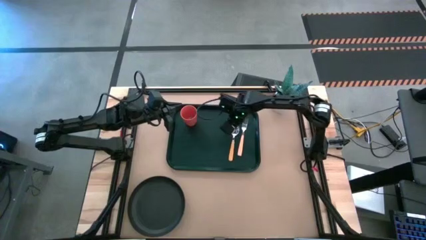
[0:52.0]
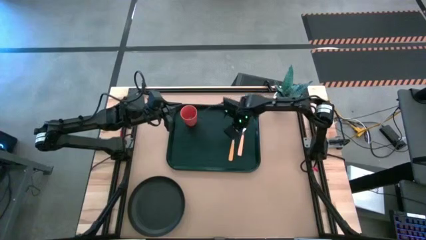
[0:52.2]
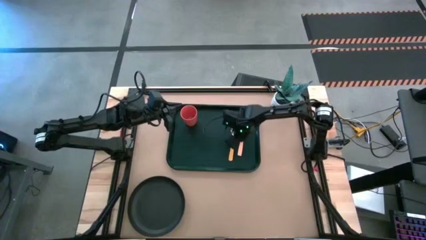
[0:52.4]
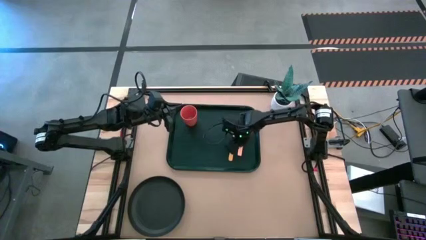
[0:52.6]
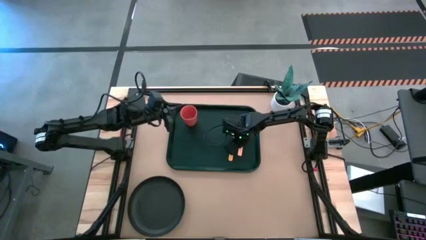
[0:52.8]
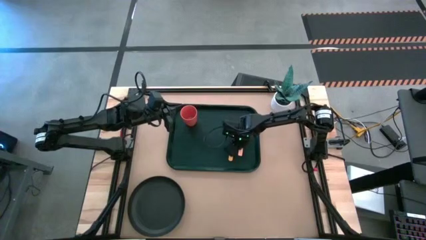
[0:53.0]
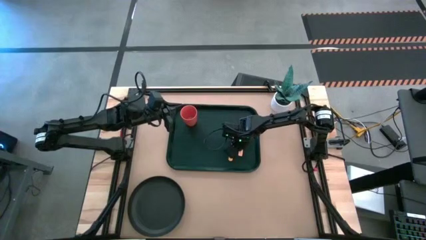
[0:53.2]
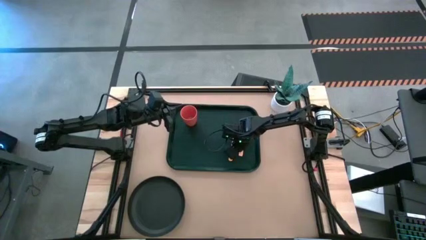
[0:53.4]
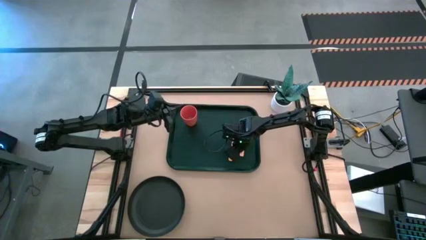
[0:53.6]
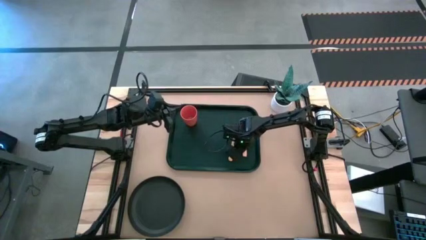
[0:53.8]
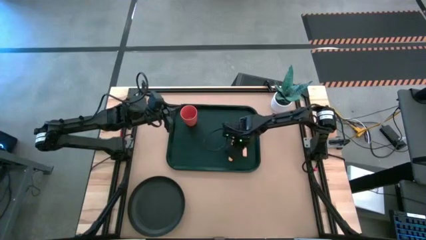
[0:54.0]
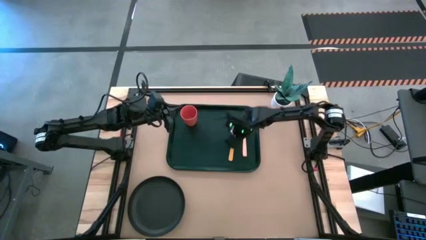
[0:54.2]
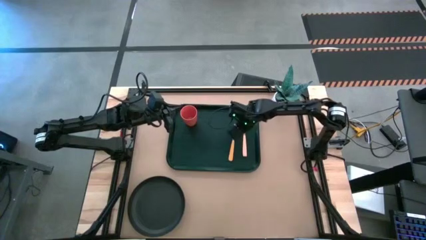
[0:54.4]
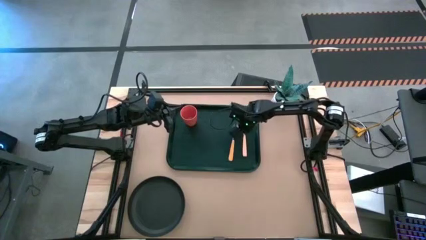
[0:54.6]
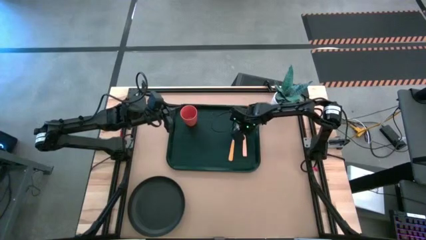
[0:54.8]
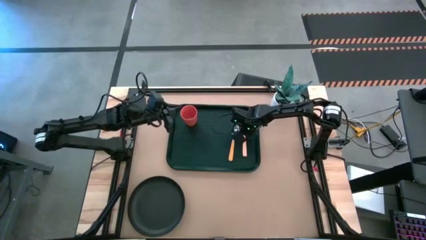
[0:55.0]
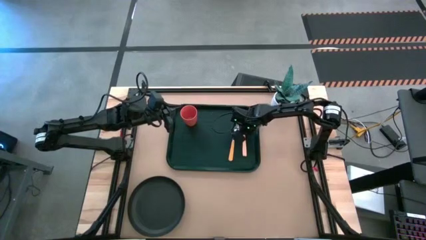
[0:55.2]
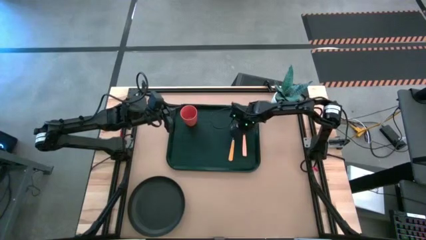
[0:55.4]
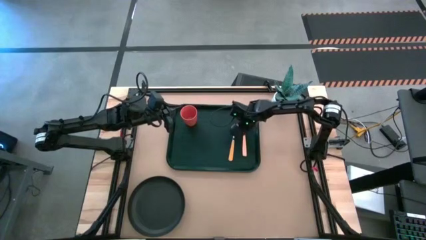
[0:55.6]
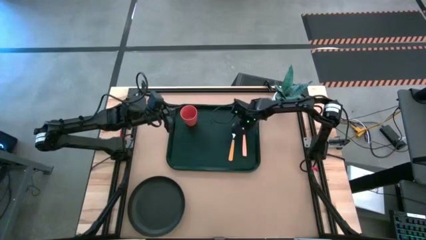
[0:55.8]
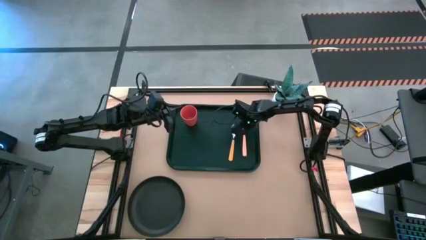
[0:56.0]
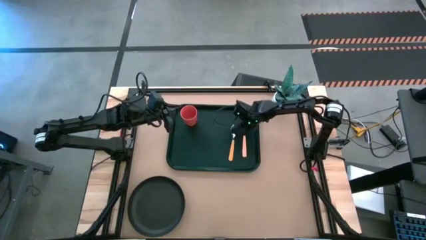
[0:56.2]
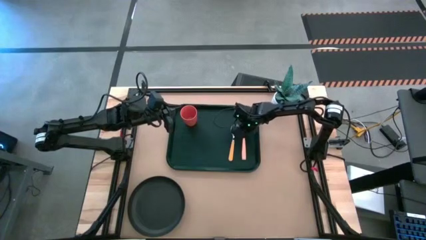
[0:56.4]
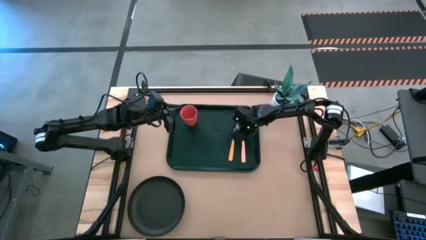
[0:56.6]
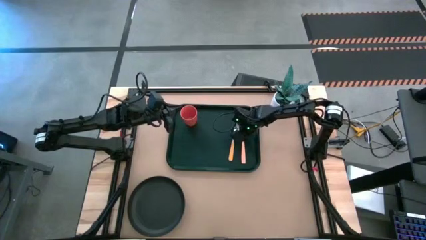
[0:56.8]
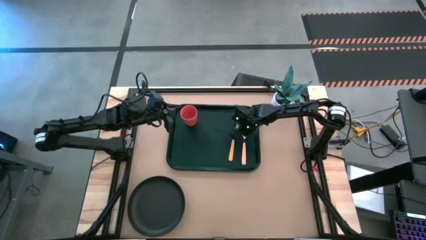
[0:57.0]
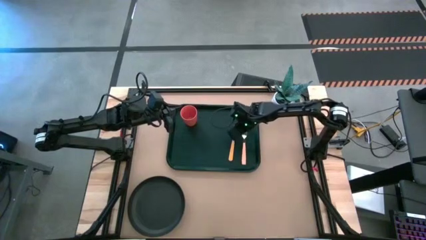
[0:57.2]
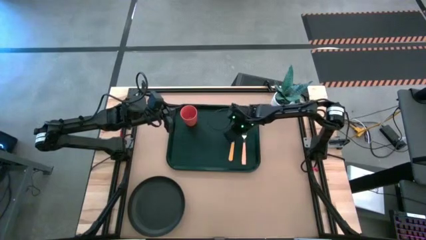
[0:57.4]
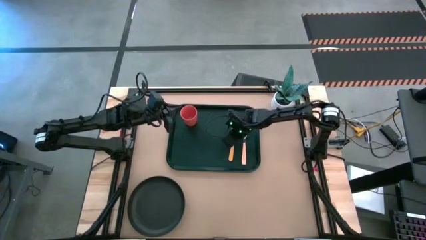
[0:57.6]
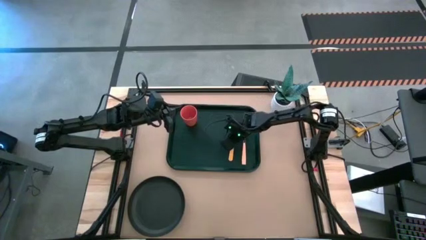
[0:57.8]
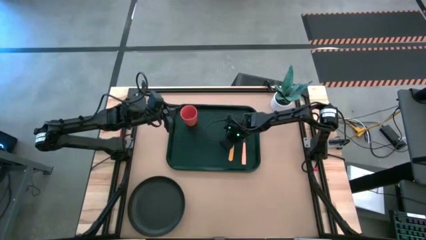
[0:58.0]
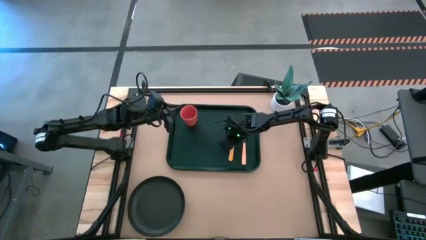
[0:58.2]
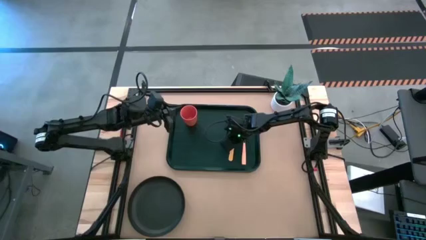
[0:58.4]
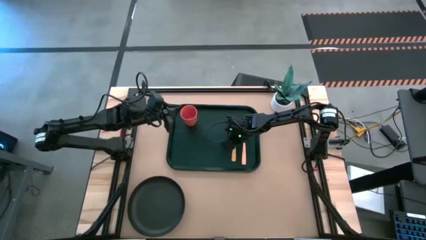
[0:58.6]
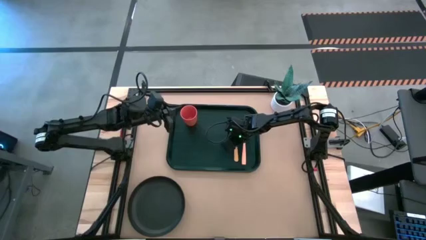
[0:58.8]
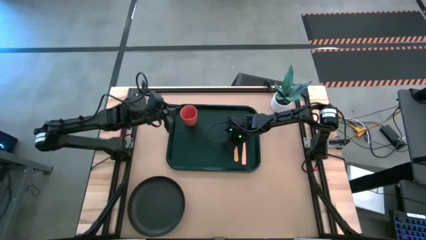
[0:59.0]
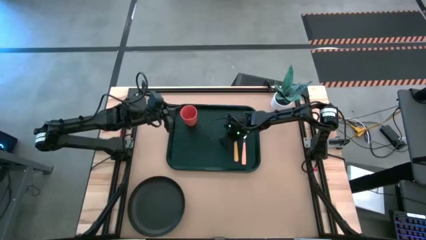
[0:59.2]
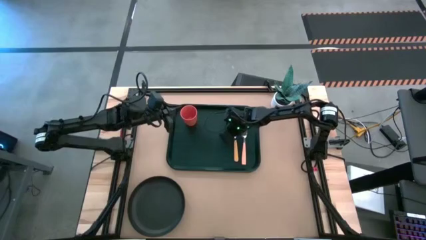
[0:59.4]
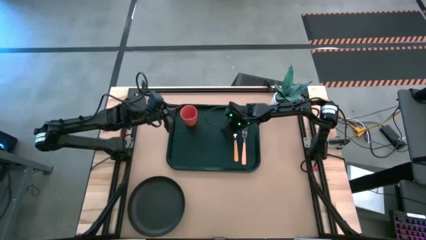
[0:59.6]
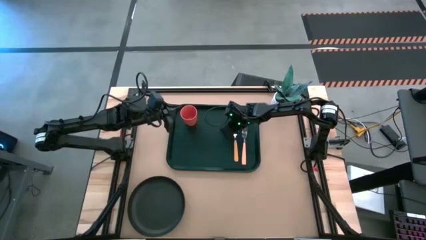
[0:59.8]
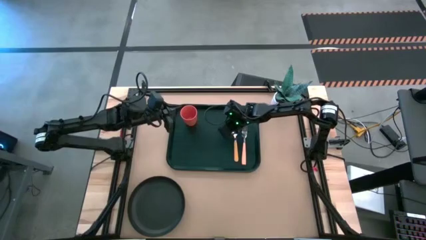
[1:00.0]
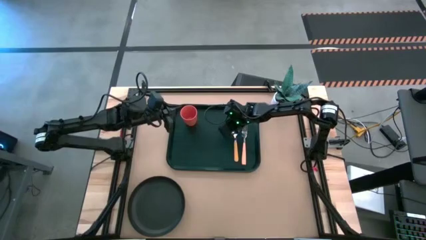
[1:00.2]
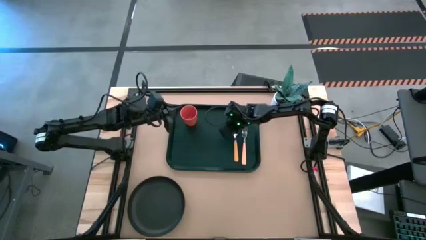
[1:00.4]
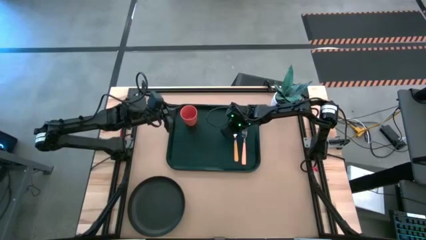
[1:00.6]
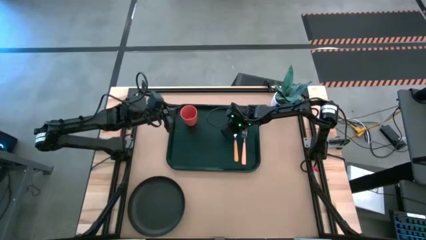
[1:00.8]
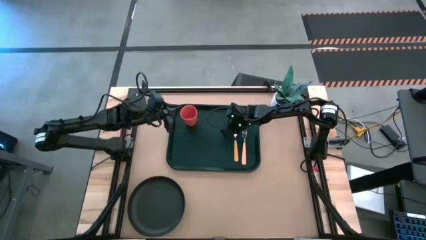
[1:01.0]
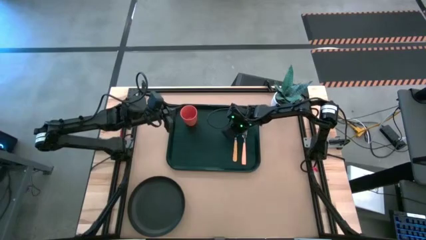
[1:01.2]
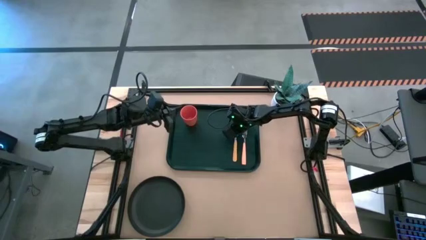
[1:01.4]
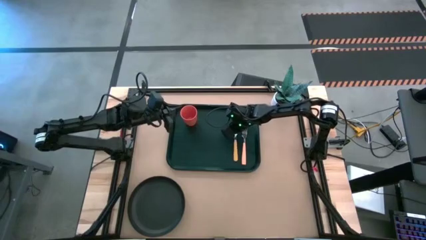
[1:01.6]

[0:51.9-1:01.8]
Task: Pick and place plate/cup/fork/spoon on tray
Adjust the utensils

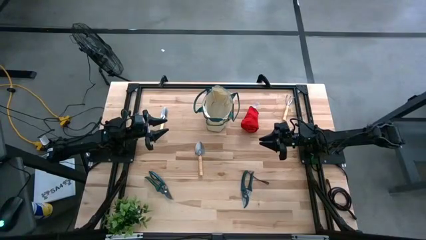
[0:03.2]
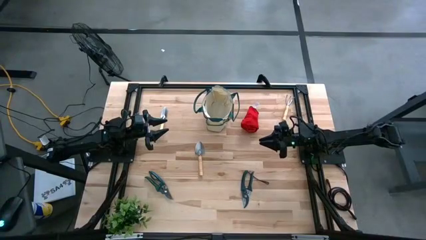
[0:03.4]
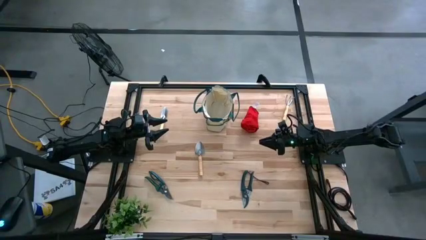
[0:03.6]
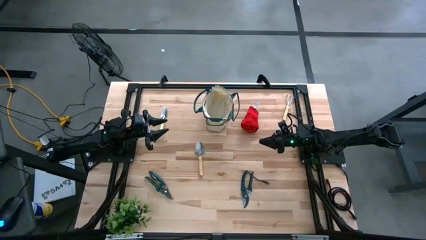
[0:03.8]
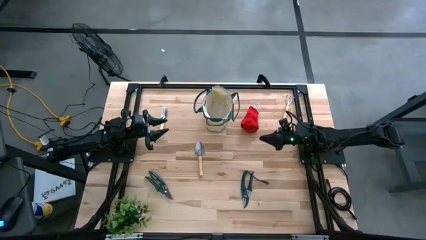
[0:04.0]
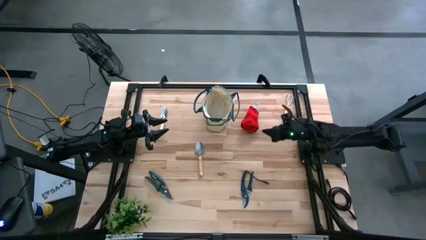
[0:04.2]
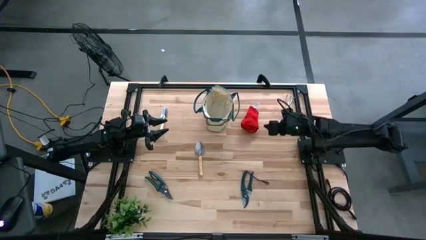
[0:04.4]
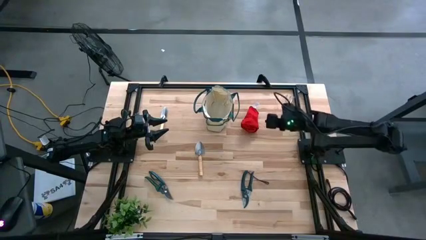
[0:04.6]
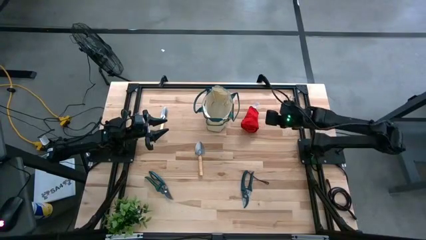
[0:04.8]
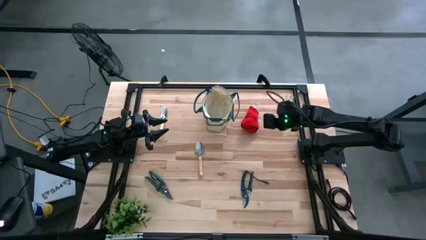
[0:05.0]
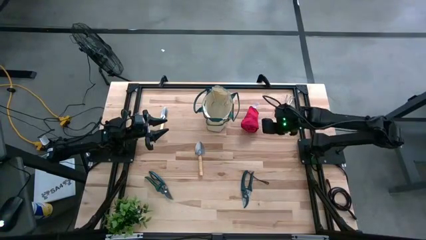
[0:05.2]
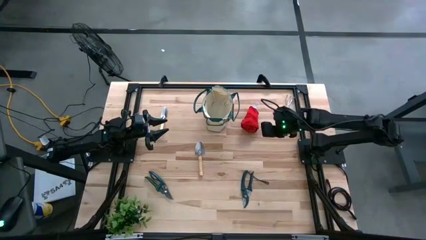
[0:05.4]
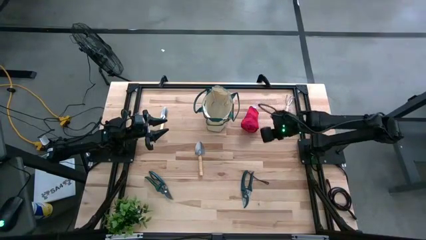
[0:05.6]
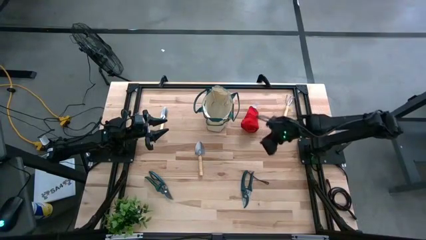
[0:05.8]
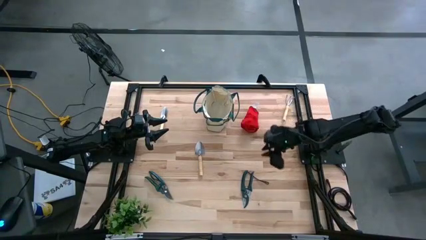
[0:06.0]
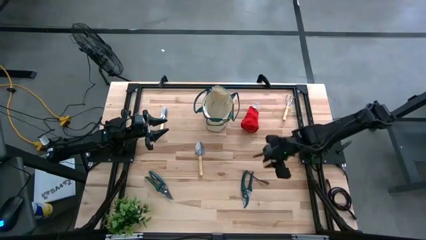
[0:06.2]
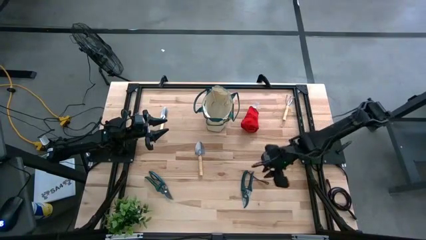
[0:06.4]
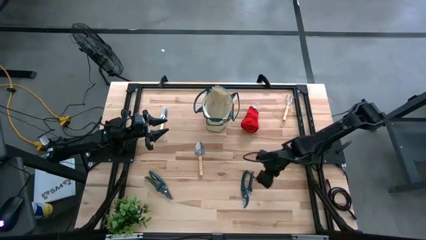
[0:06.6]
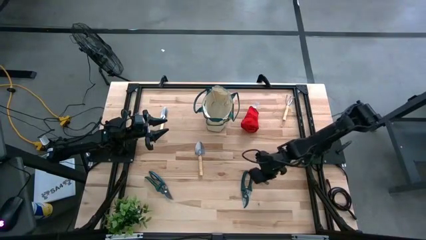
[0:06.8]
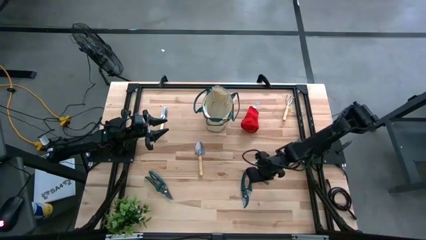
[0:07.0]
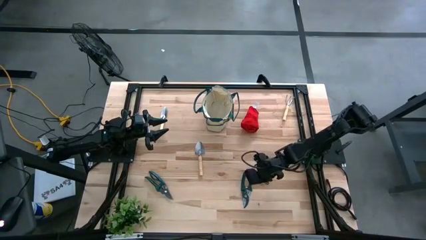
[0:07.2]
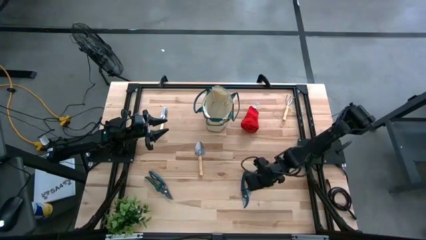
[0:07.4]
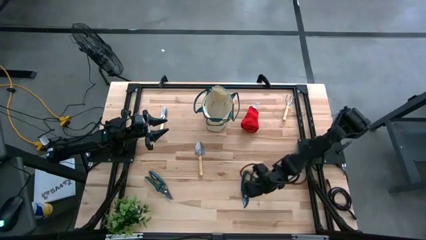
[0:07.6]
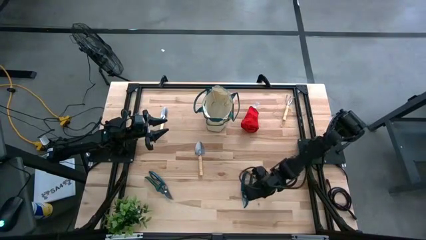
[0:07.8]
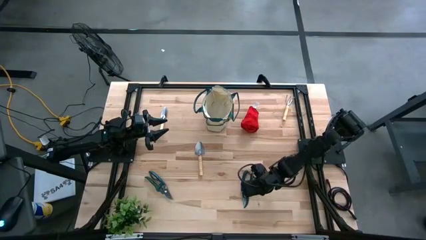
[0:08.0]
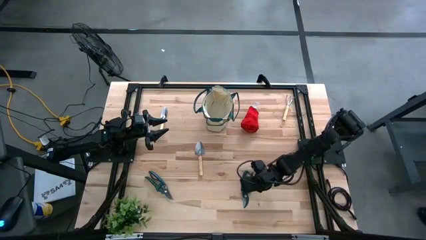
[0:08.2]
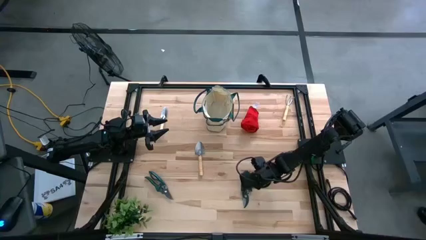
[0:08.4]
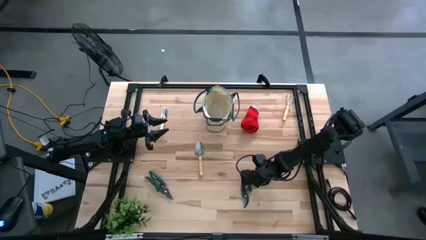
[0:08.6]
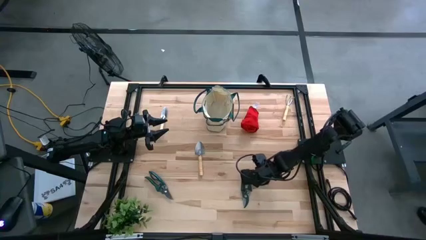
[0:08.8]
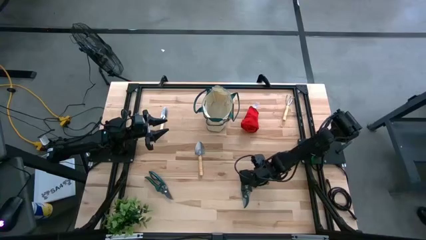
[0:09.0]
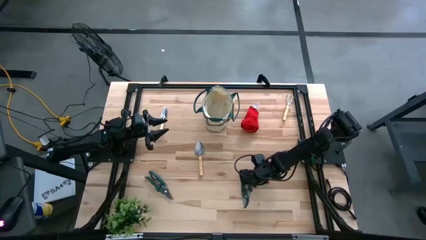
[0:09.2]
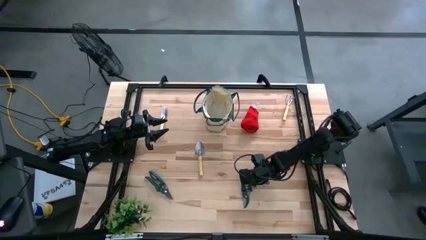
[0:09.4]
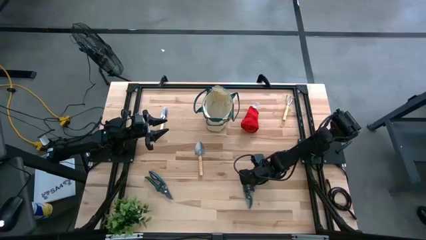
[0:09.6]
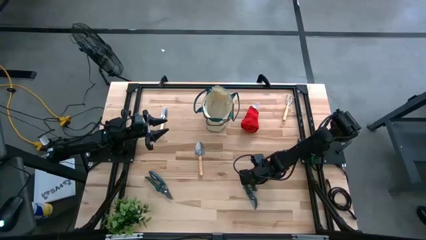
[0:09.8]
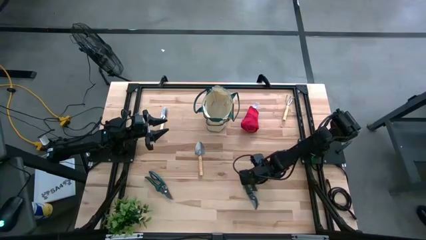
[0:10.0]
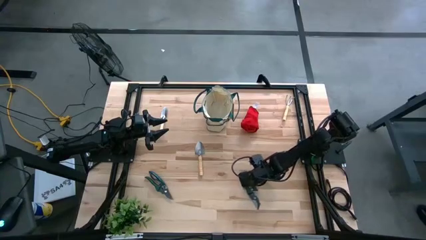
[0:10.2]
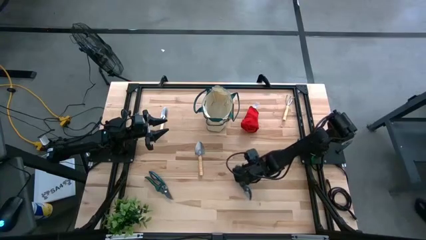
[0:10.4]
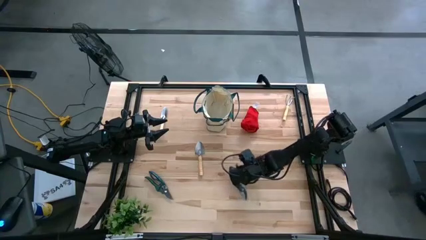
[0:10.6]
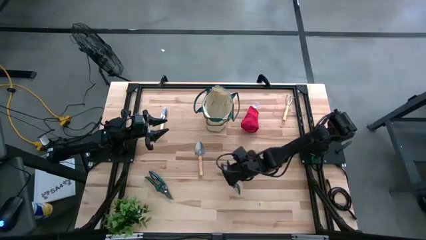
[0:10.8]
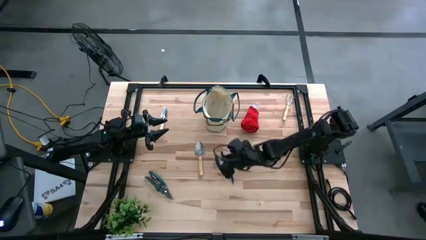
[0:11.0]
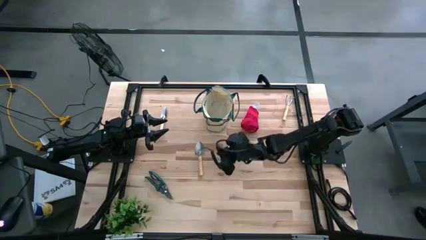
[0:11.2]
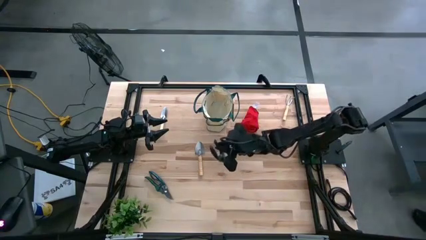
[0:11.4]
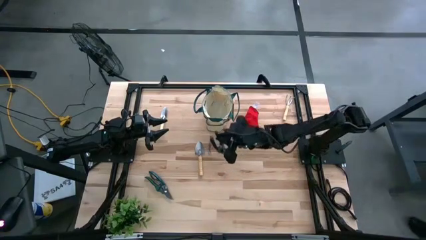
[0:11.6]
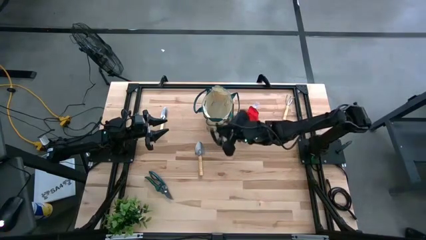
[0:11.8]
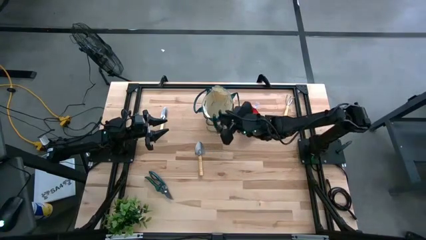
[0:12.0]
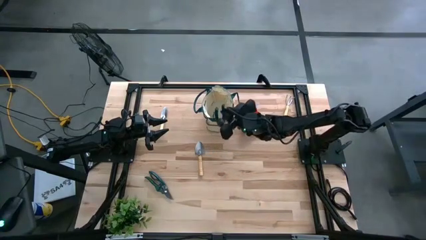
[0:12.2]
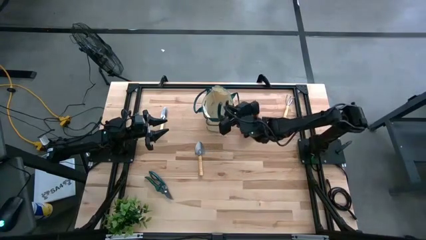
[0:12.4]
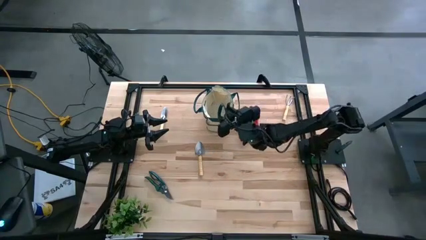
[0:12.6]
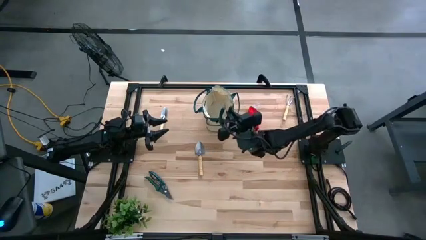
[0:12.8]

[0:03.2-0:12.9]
Task: Pick & Place Garden tools in Gardening bag
Put the green shear scissors into the gardening bag
